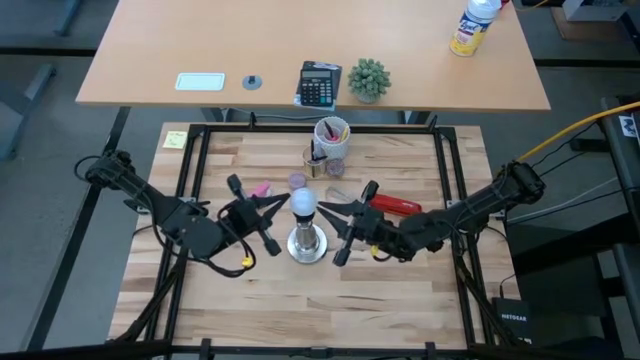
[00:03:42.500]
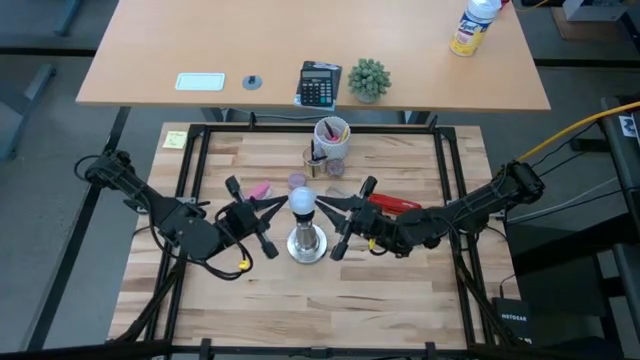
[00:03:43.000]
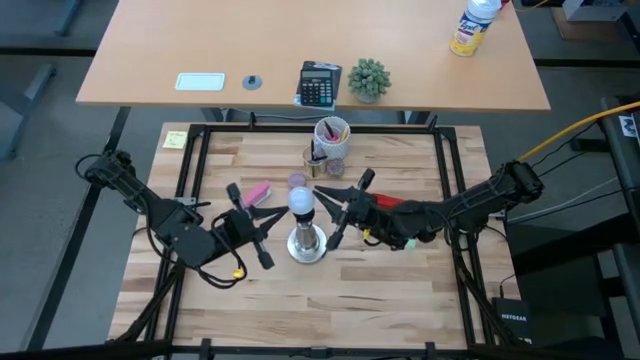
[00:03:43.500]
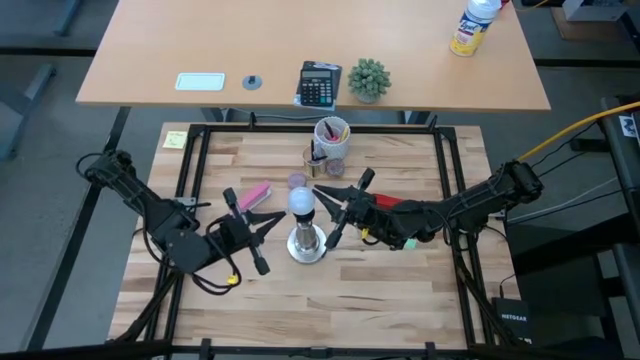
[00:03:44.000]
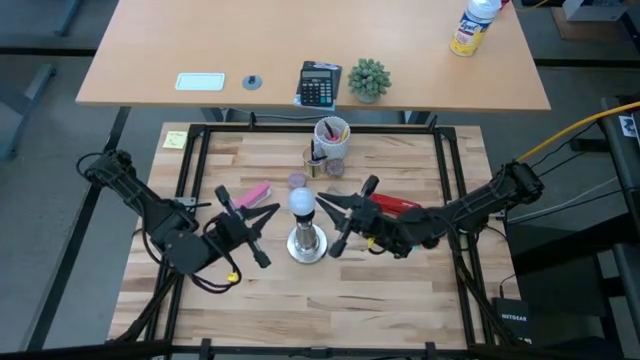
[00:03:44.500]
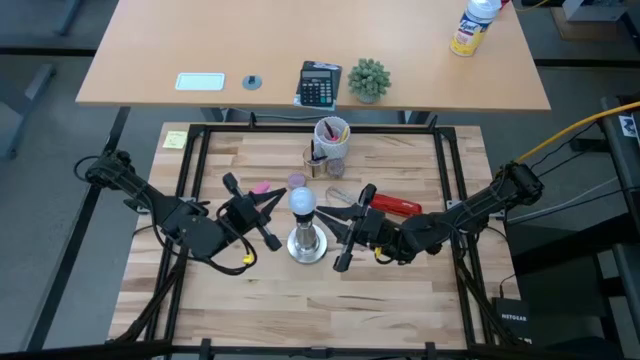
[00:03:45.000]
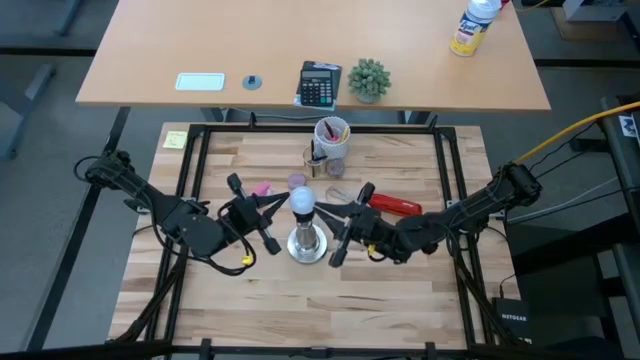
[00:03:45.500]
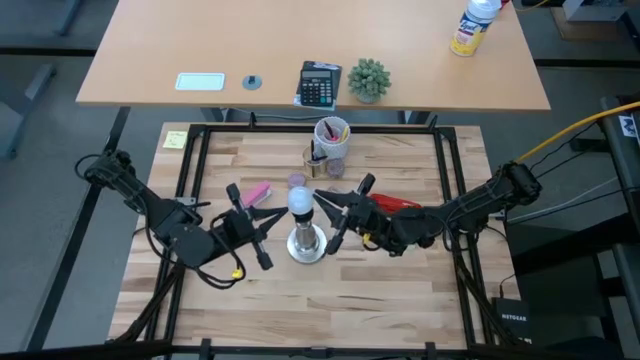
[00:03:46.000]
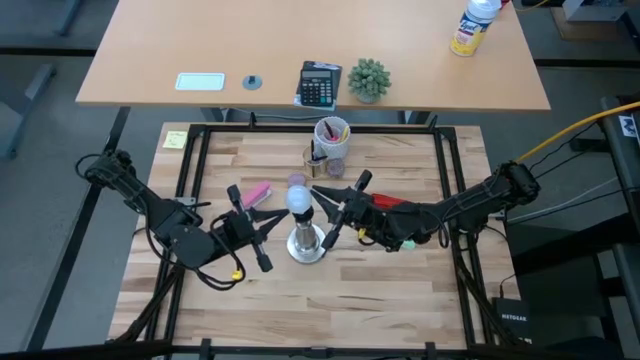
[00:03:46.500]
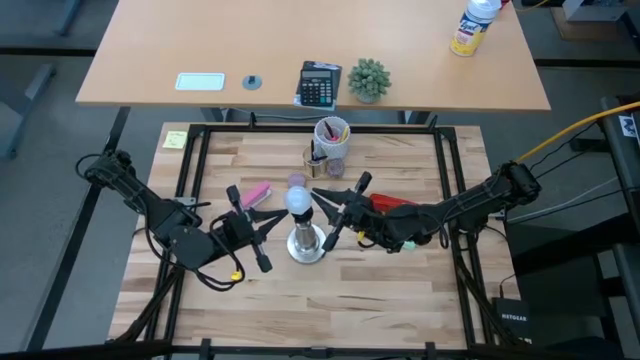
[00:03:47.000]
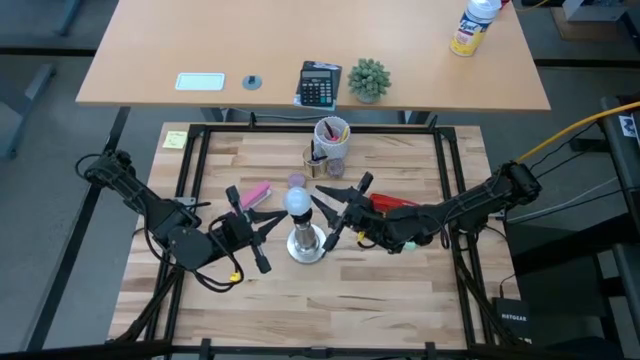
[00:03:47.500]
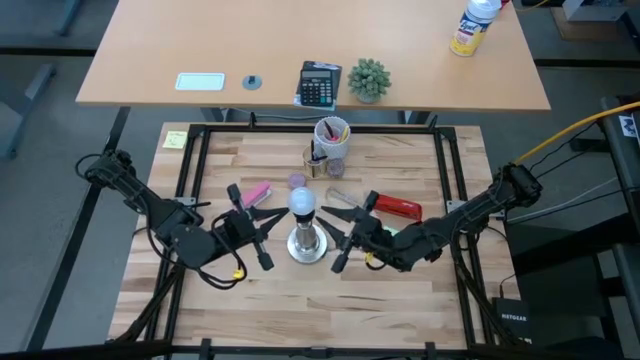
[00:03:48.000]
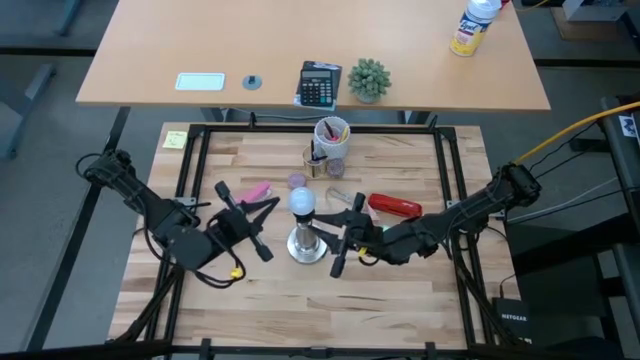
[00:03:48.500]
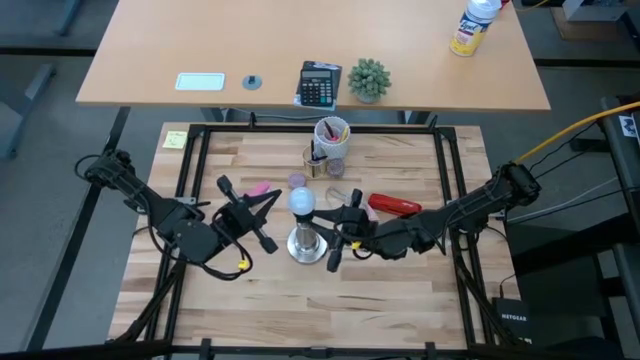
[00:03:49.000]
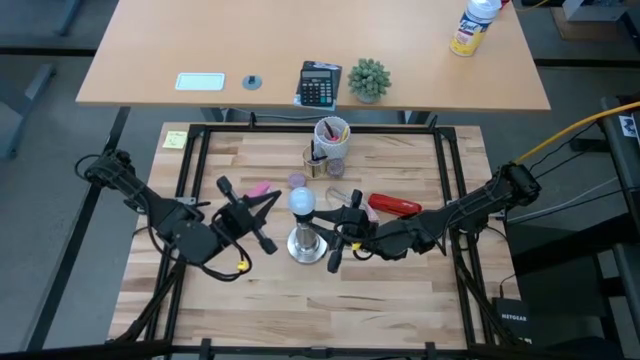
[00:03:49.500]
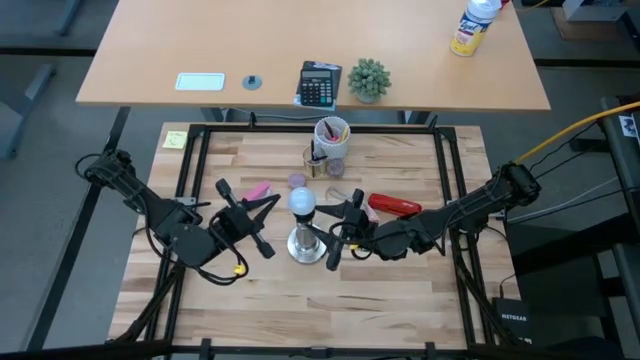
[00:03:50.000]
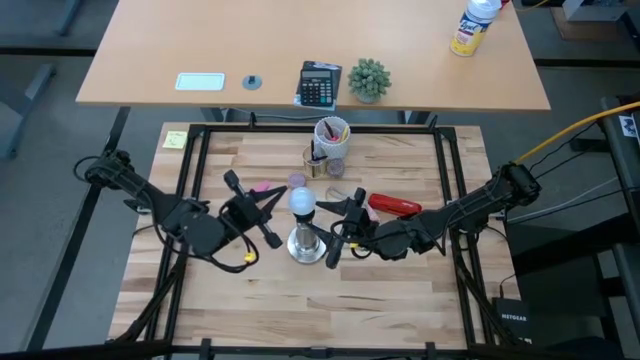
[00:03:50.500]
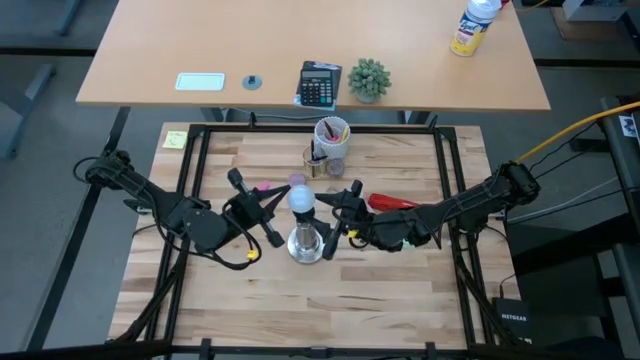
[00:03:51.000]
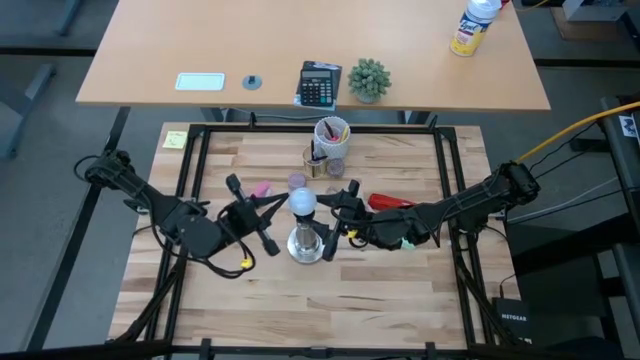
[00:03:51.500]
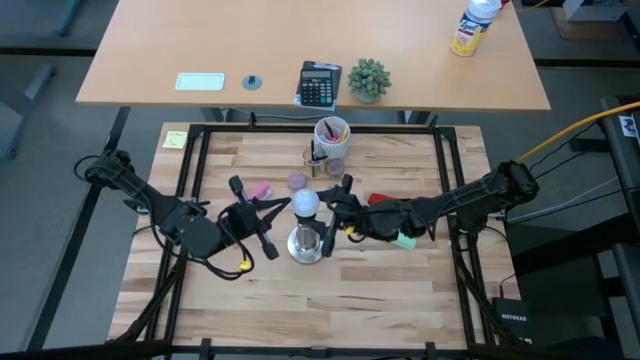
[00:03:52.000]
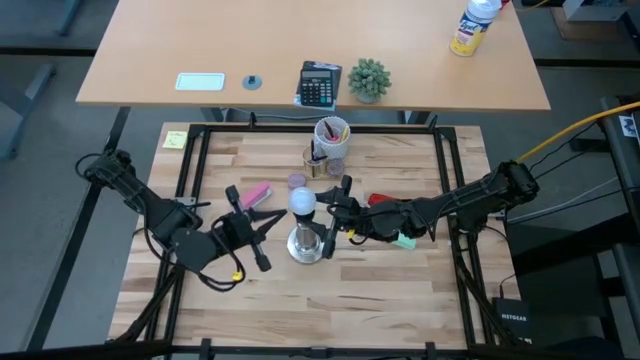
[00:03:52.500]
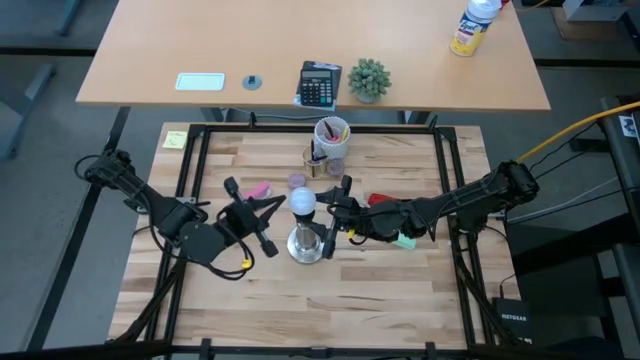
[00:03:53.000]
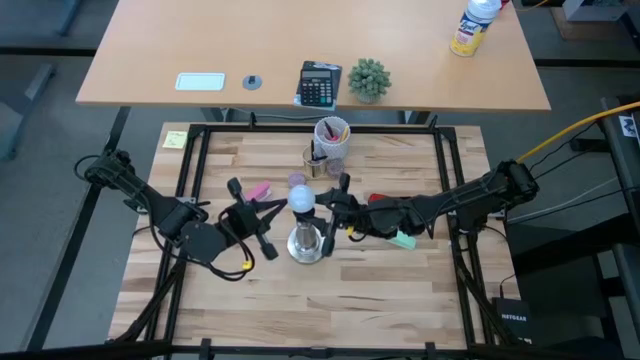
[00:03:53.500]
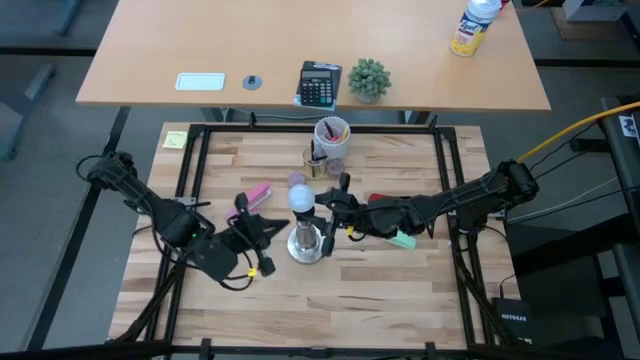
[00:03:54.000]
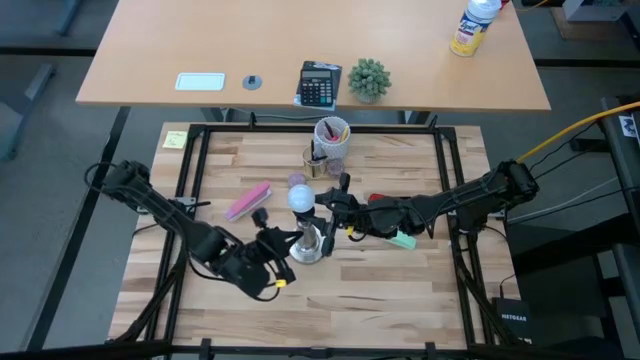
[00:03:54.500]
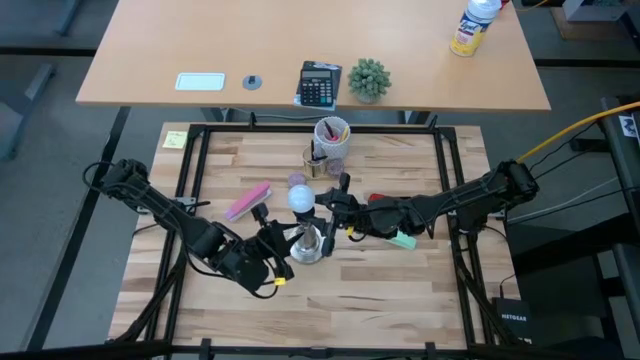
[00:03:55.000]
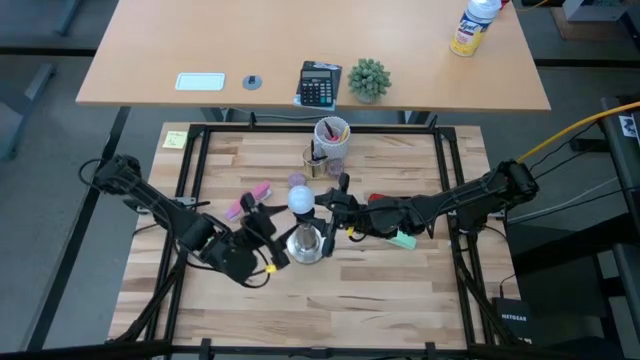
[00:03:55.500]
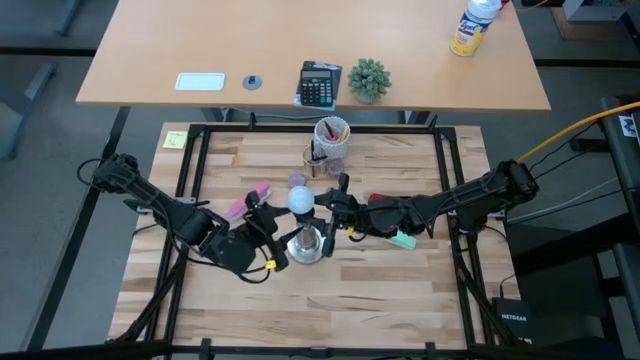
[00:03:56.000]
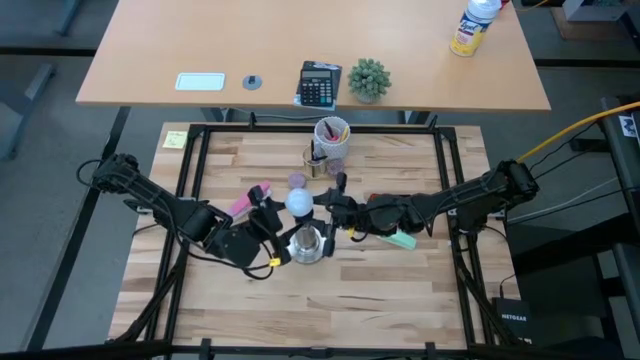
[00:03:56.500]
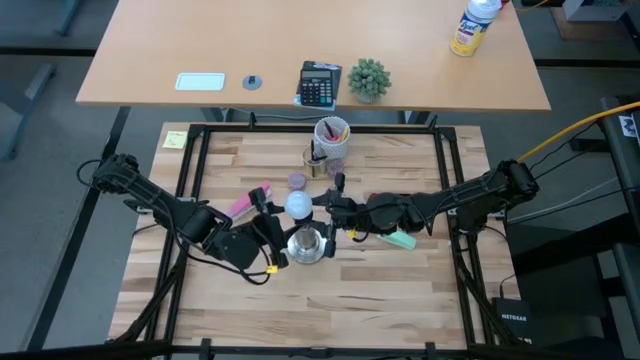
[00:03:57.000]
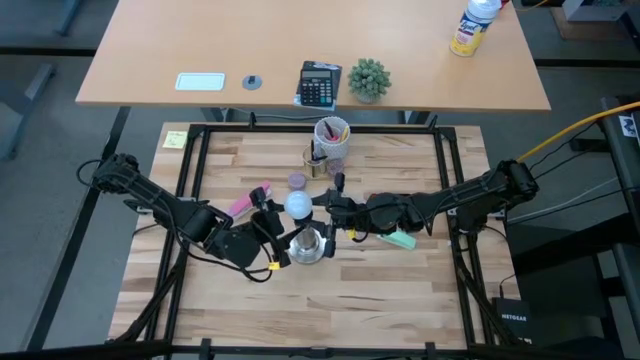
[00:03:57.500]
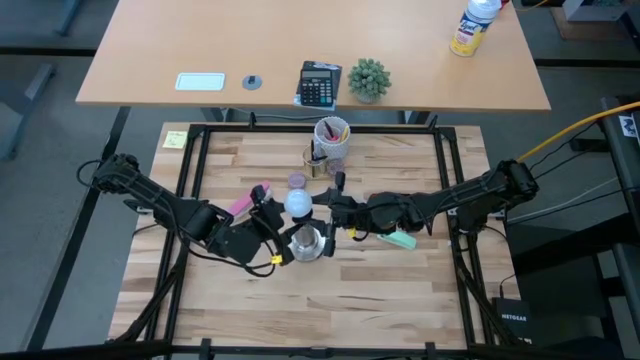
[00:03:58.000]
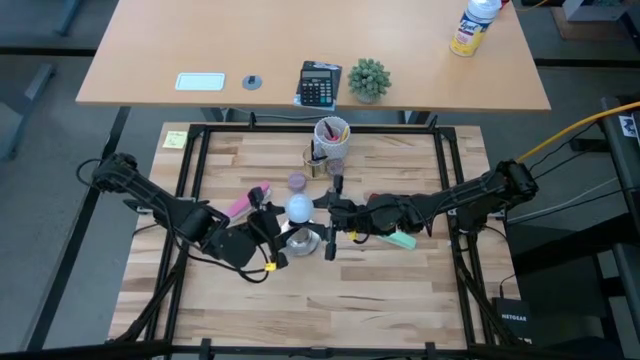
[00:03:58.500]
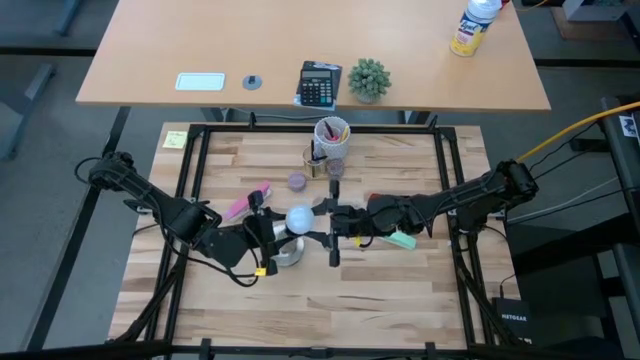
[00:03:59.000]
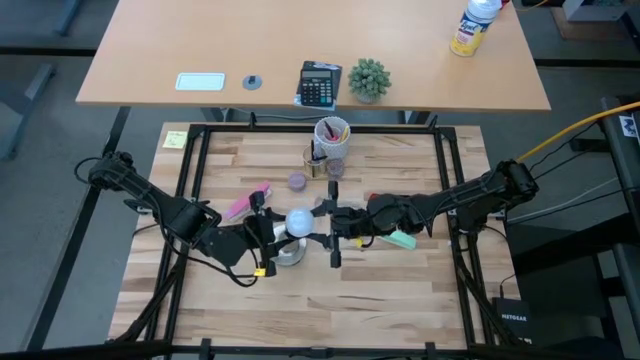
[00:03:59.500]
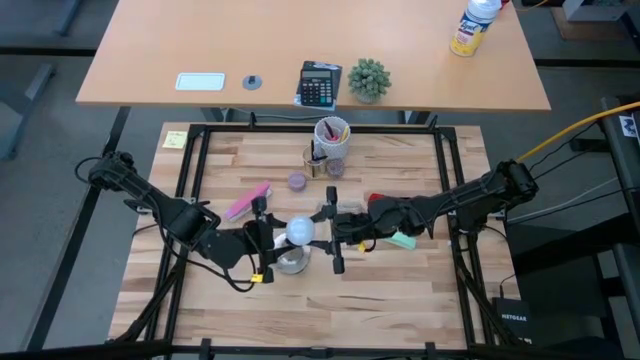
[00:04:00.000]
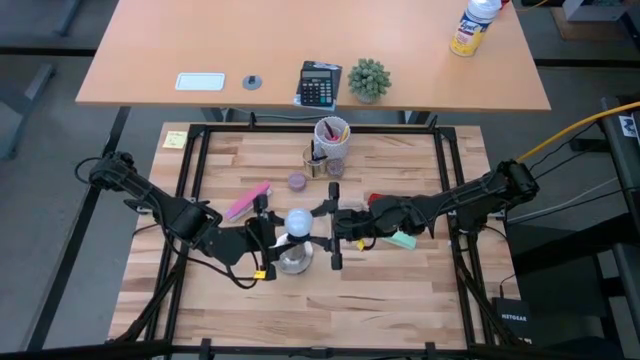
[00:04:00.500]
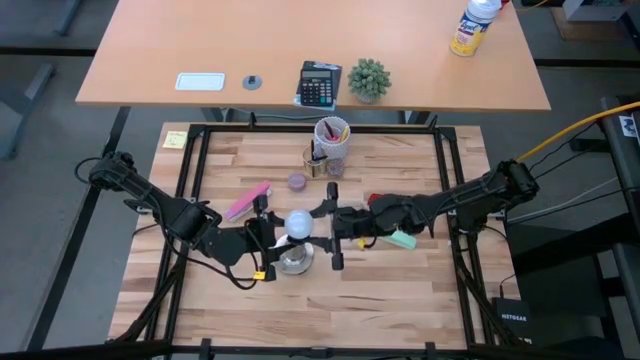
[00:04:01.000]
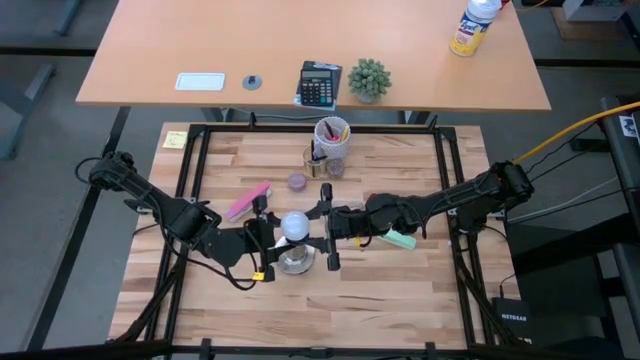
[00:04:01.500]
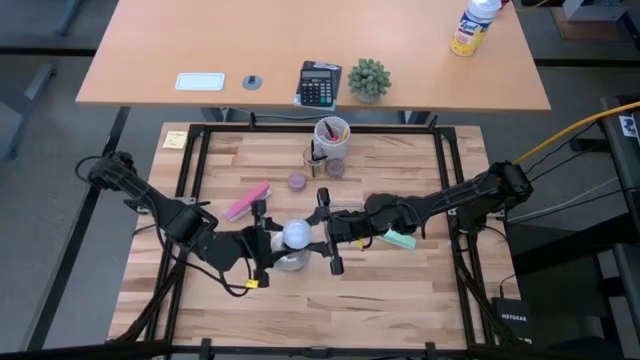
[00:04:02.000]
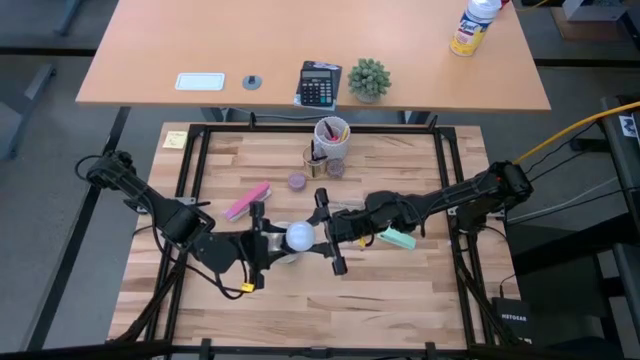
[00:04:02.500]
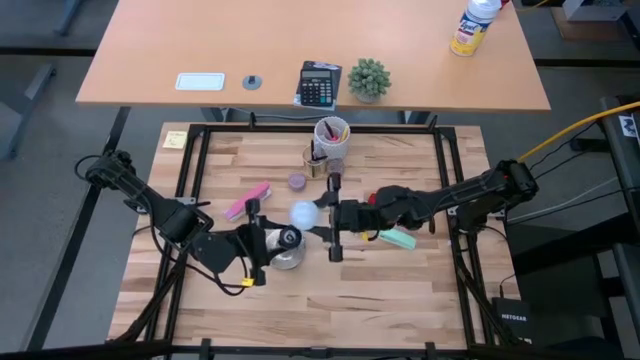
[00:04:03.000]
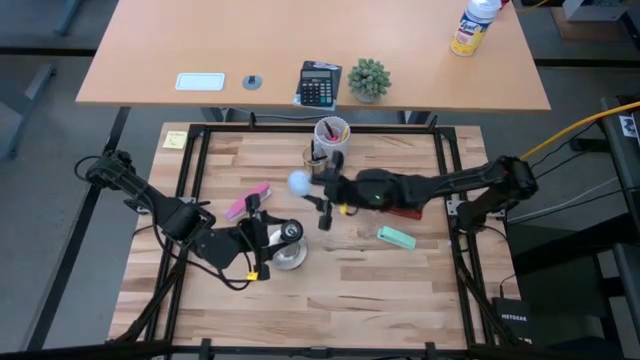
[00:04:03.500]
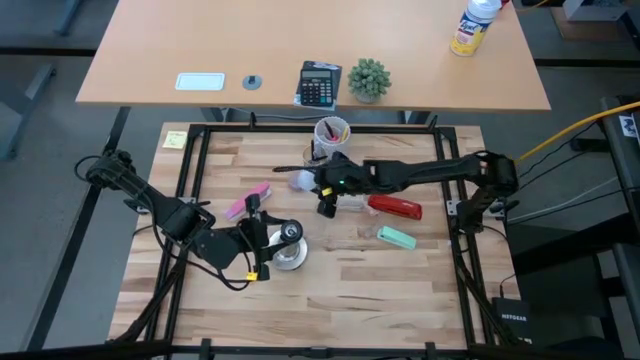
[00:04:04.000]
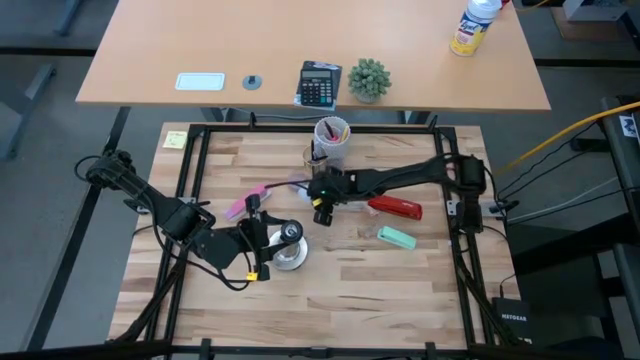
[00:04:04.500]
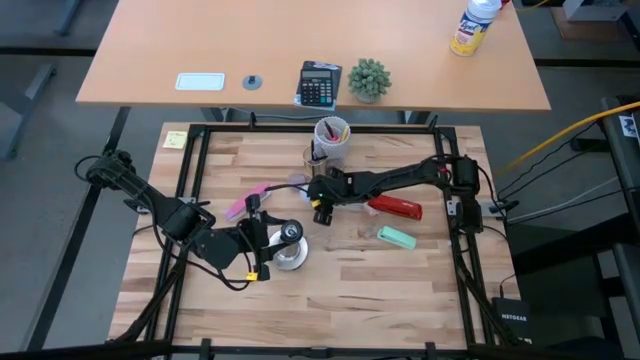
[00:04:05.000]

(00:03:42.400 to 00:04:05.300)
Task: Screw lightbulb
Remove the lightbulb from the lamp socket
